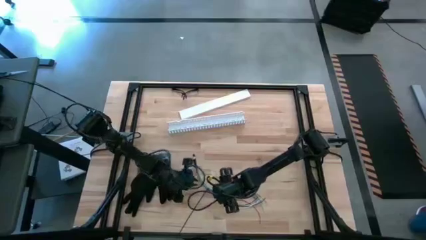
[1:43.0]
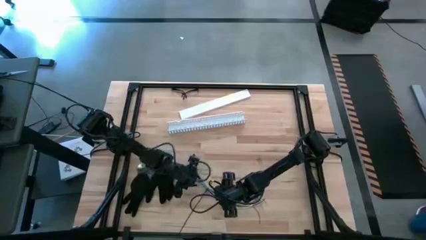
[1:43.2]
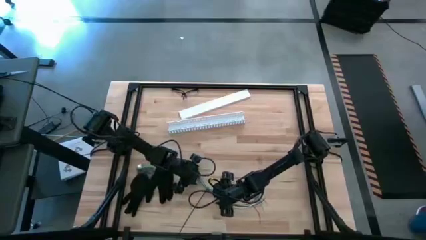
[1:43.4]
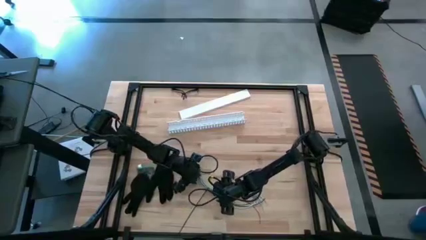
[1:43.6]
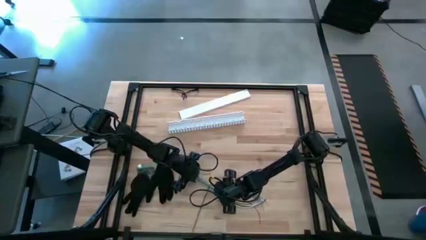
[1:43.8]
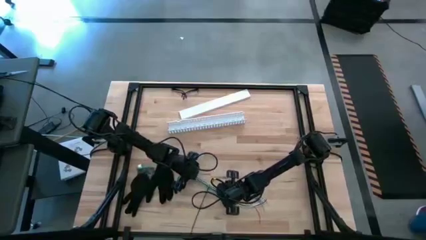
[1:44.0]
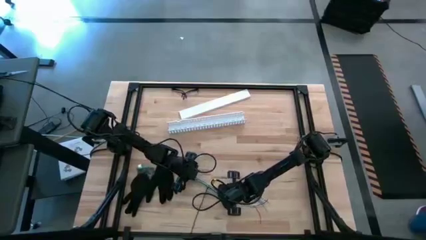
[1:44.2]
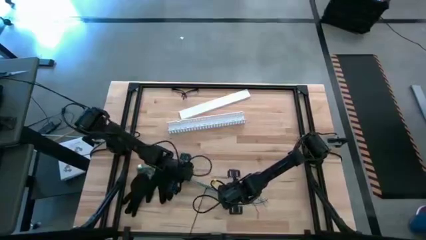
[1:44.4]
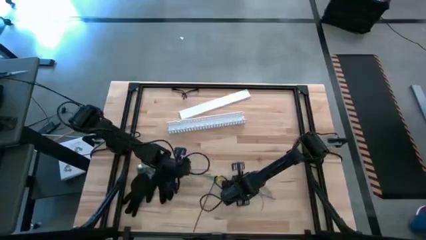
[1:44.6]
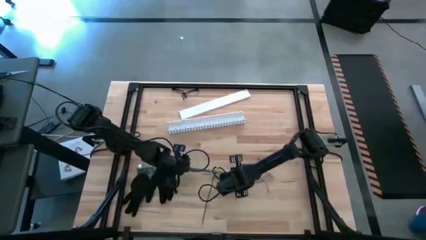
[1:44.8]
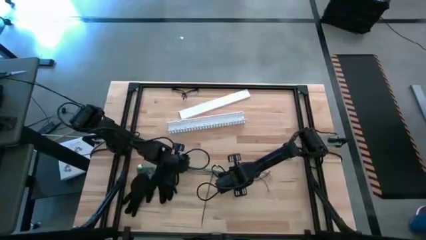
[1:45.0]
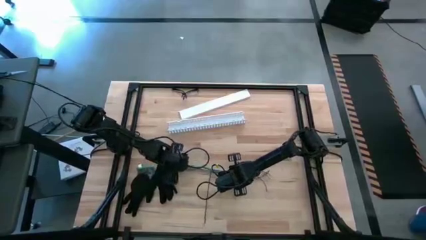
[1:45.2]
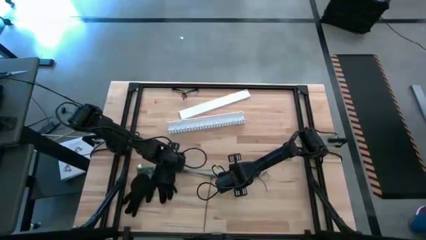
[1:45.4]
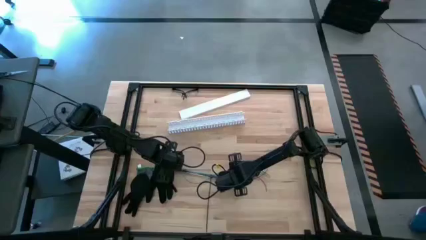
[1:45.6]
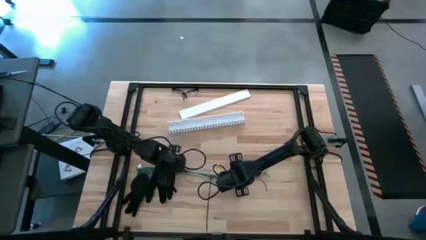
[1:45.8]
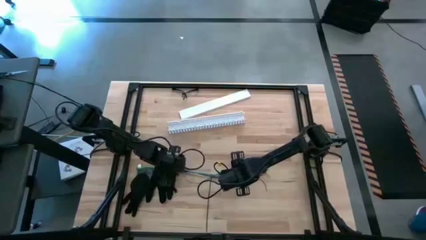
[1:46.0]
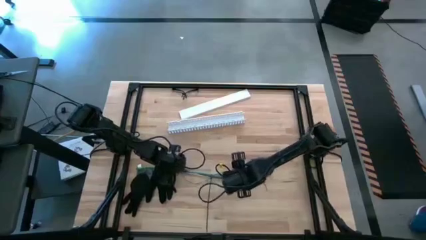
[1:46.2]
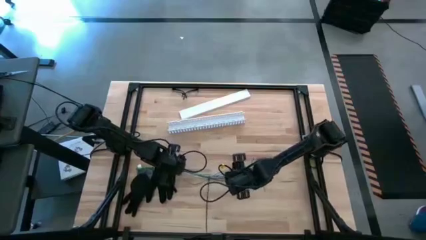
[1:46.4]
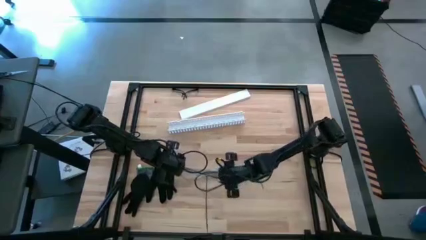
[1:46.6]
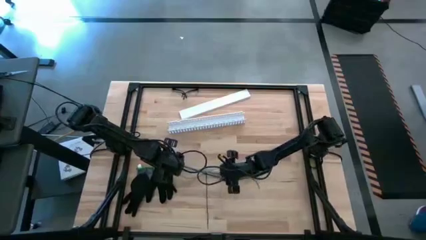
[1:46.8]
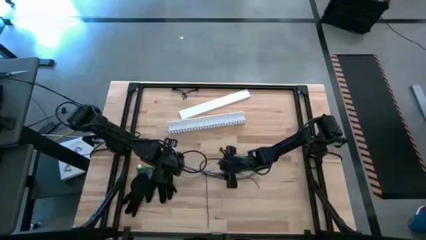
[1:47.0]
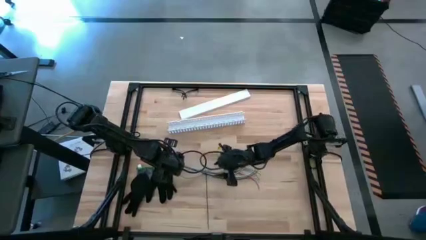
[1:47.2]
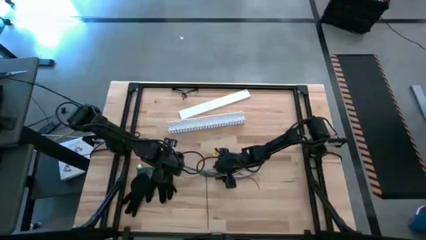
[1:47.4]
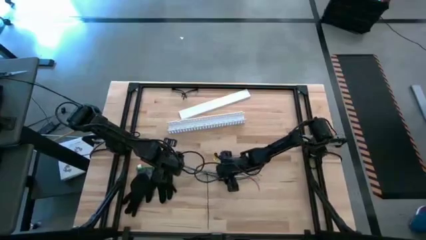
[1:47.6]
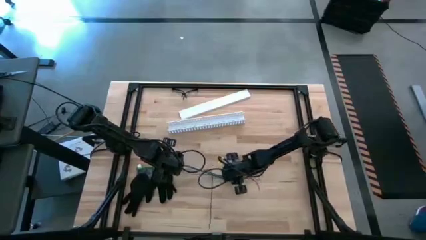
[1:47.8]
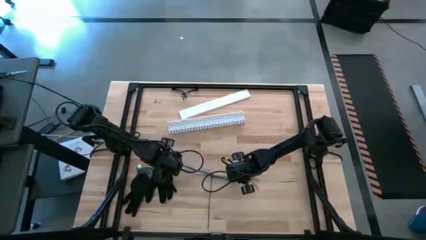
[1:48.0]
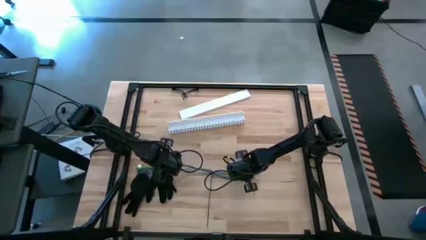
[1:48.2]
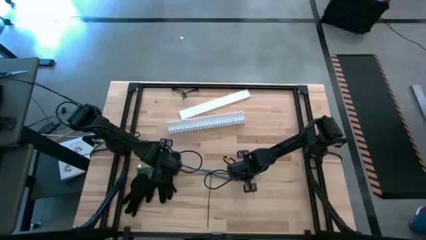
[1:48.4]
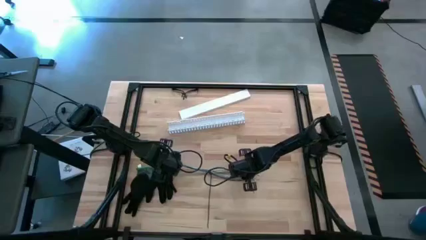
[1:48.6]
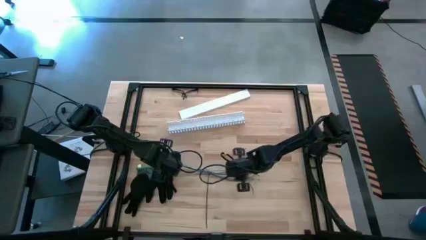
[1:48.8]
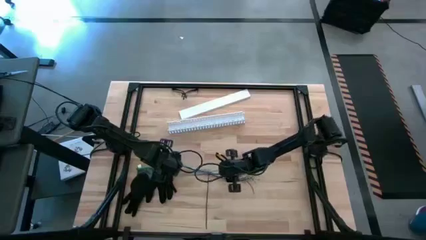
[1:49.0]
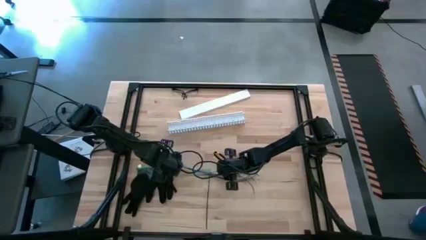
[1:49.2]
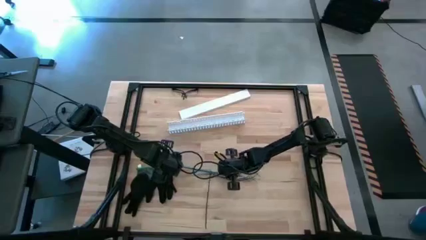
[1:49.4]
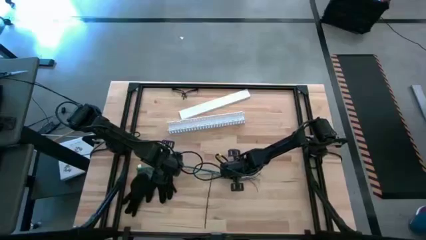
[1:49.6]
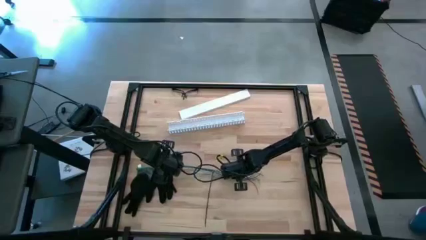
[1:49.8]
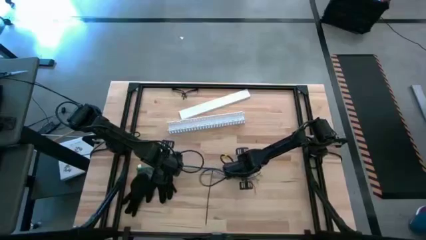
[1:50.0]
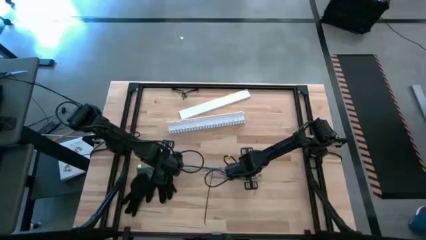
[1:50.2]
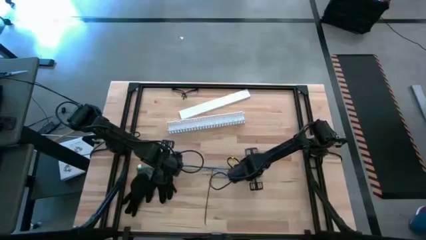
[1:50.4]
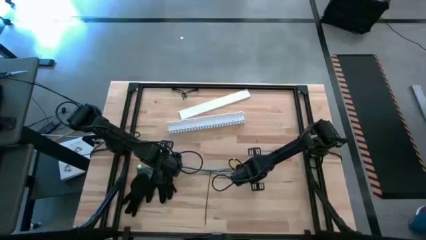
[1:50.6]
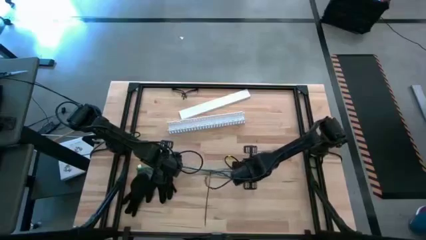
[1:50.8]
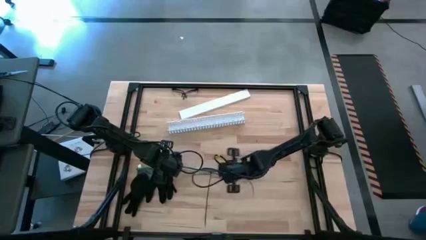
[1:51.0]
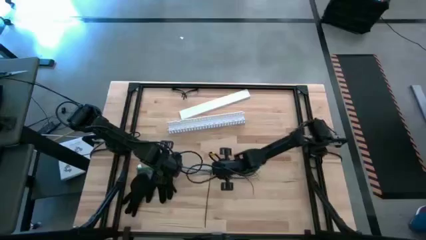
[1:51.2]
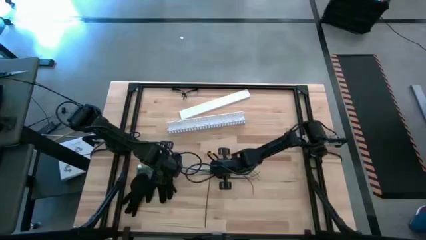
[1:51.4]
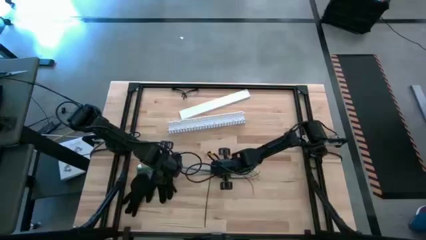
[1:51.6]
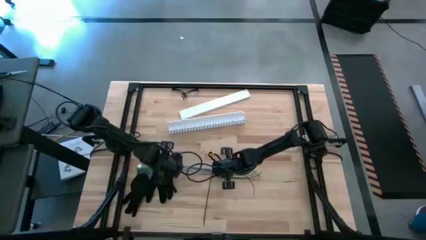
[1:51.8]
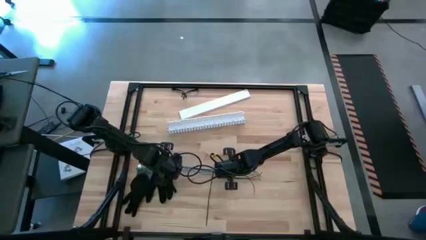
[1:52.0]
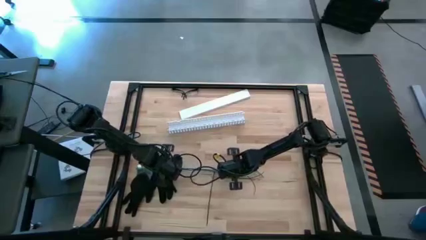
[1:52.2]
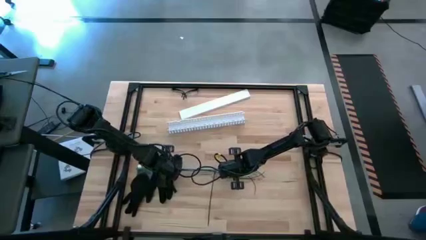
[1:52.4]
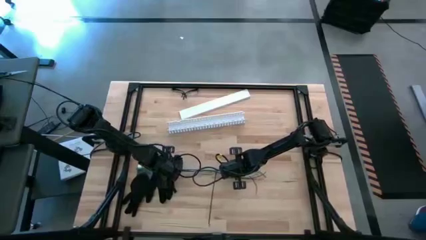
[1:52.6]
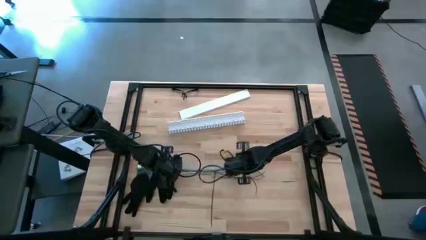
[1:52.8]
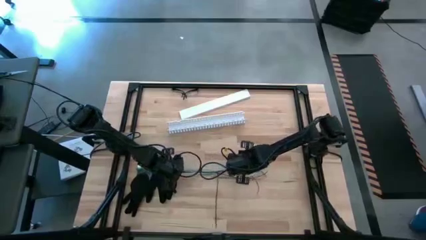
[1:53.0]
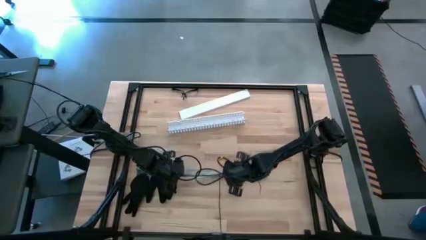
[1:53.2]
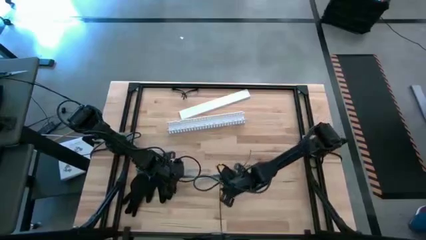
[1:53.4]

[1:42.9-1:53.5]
Task: Ziptie cables
Wrap the black zip tie on the cable

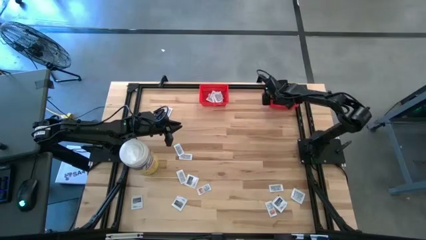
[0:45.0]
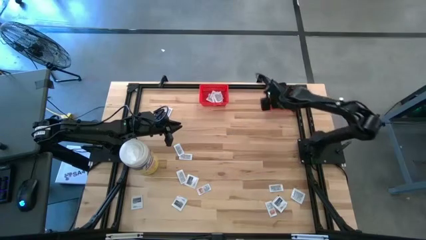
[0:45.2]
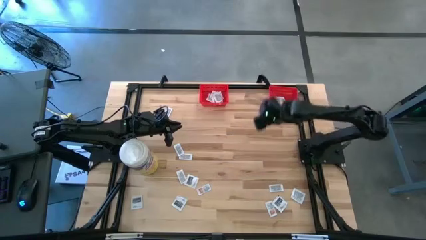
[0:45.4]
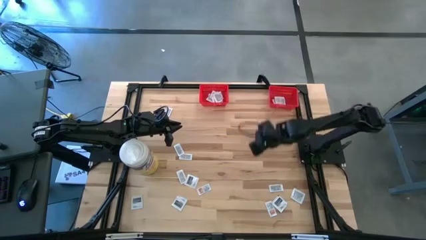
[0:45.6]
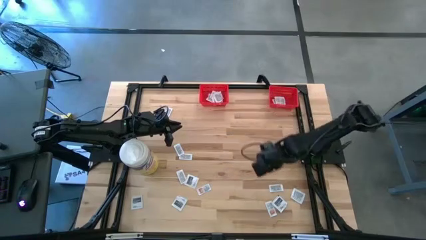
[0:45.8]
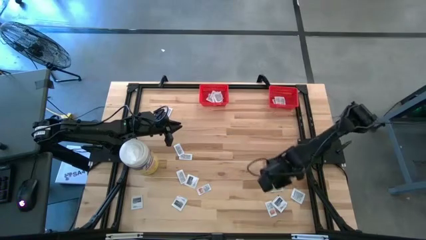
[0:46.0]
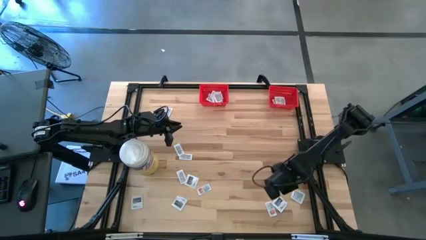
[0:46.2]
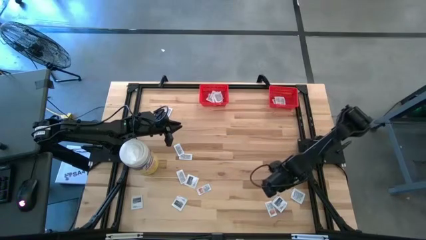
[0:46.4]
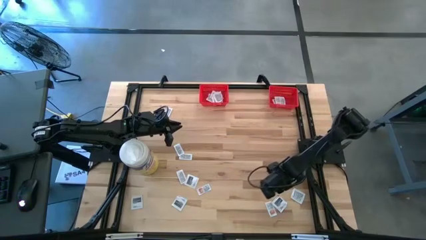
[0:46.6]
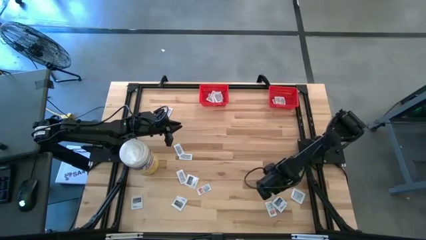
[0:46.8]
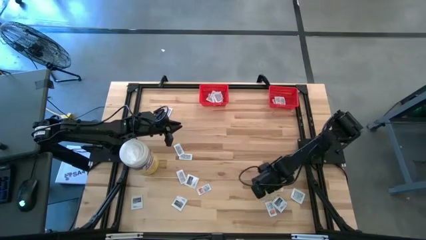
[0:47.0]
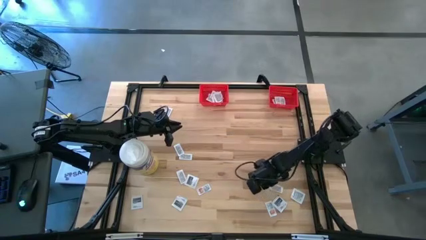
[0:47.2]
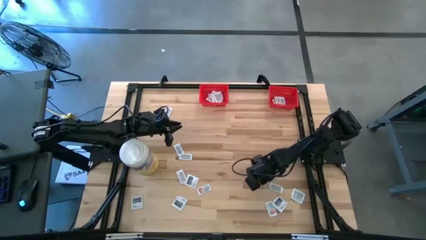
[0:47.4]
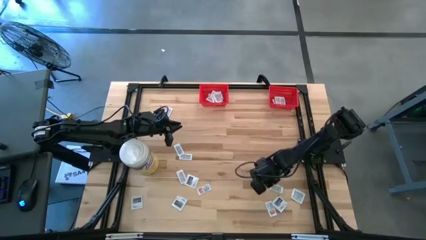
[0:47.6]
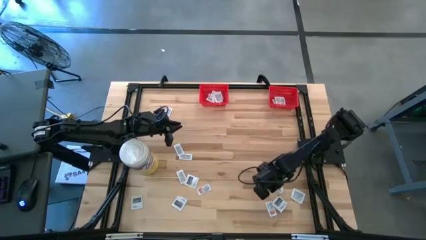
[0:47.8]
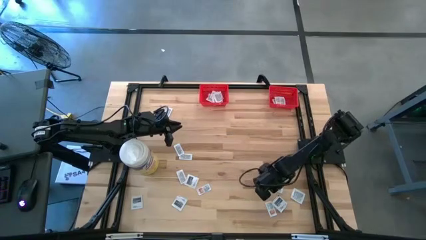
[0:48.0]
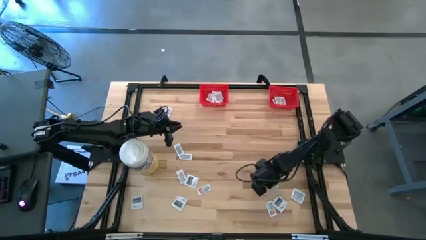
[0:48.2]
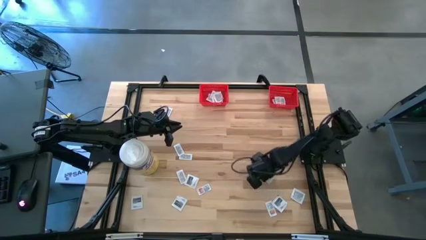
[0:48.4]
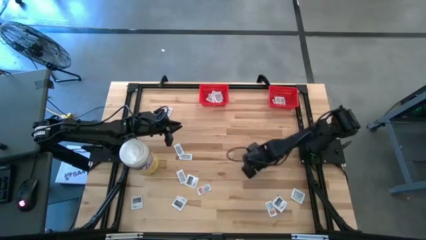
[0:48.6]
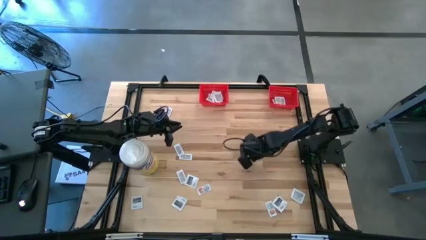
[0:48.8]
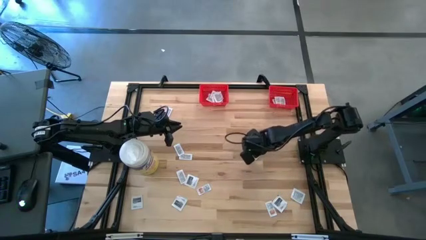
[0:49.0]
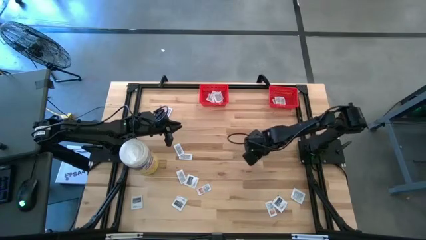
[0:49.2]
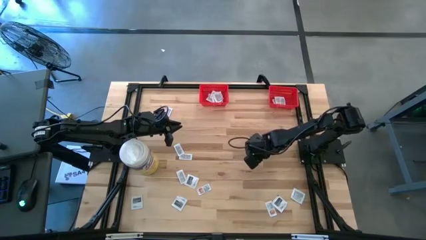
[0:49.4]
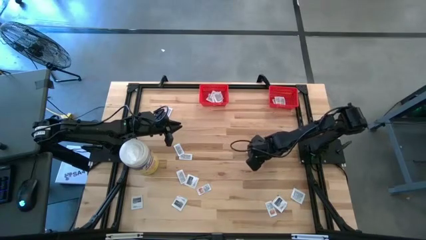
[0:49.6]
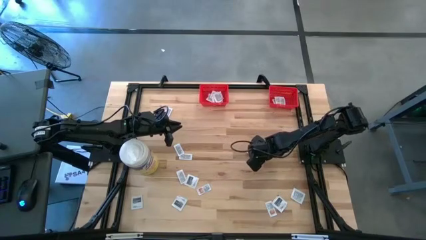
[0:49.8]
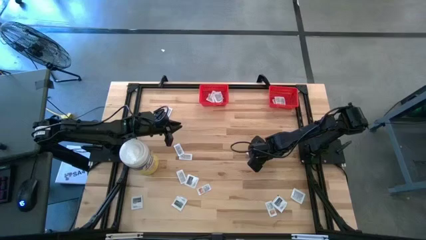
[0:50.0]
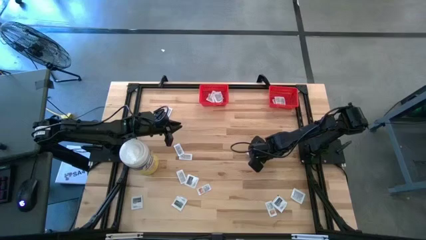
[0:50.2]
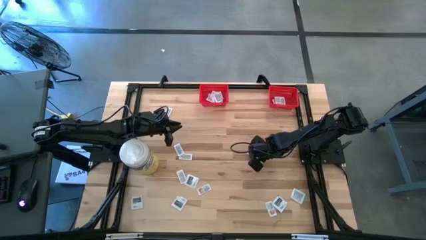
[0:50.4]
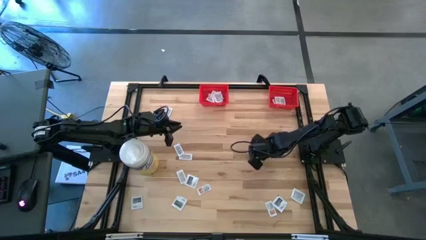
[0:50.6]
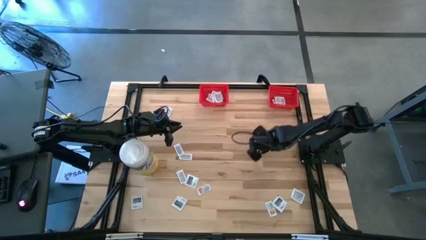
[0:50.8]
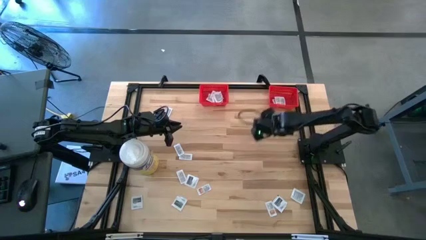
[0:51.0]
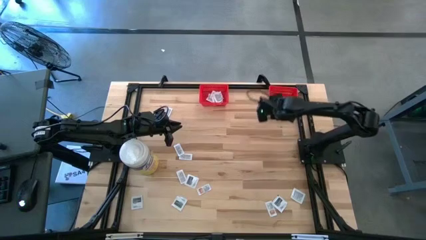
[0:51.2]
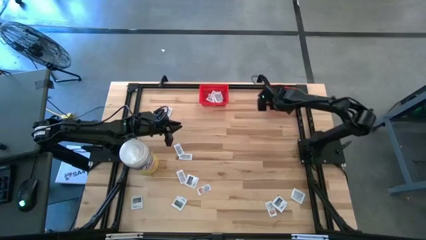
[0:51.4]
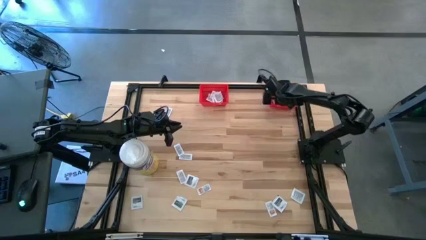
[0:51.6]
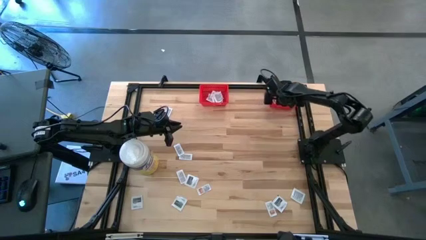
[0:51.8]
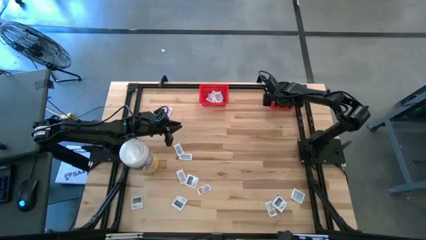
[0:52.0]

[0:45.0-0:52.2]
Task: Pick & Place First Aid Supplies
Put the ointment pack into the right red bin
